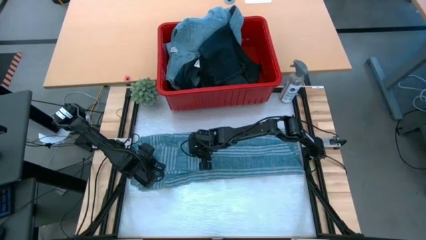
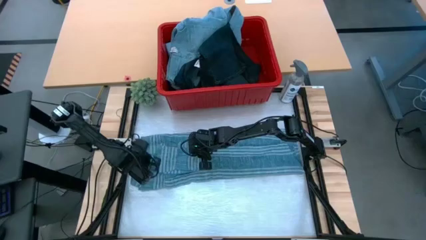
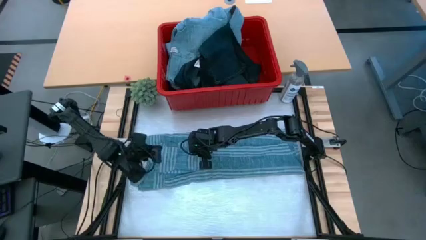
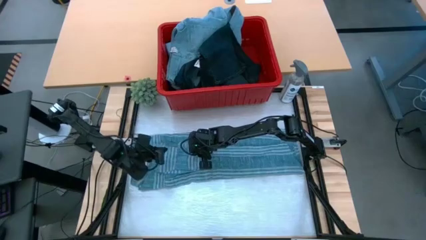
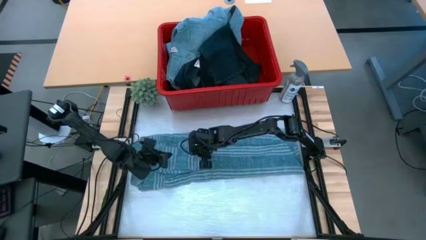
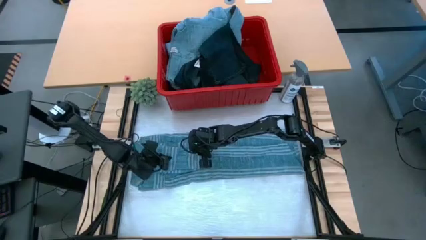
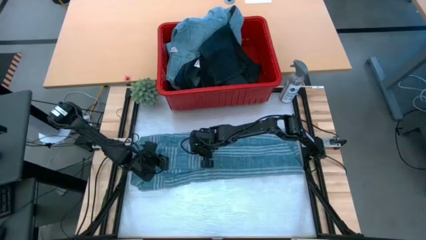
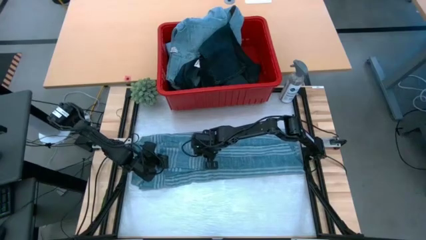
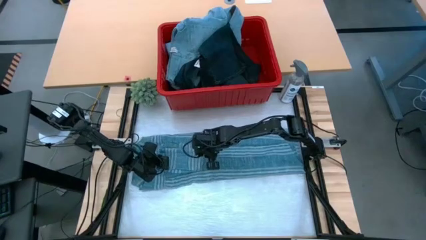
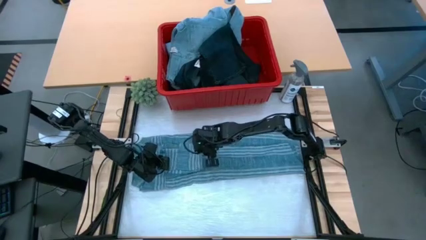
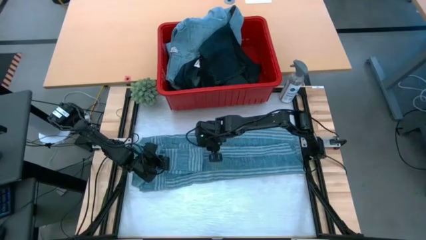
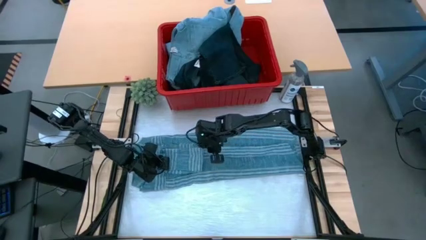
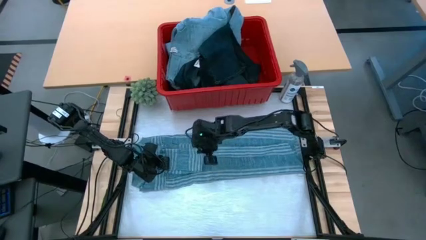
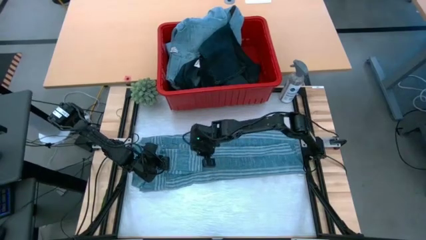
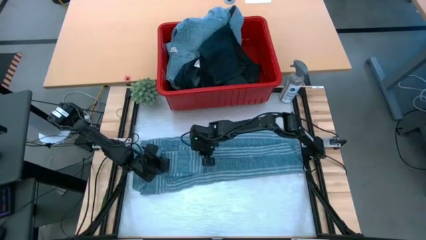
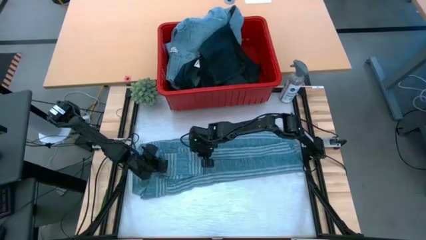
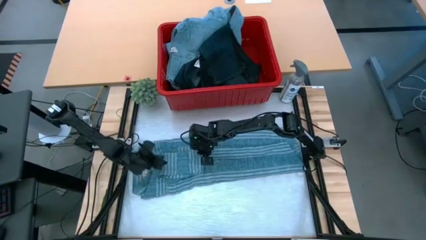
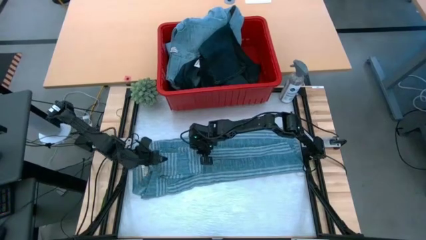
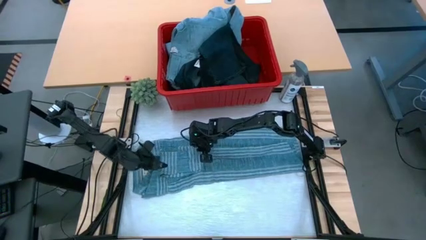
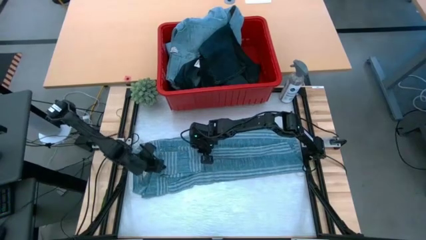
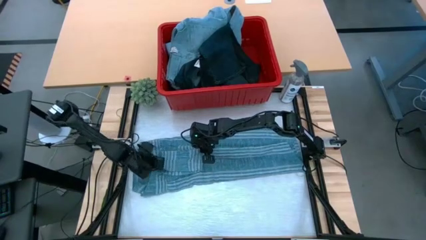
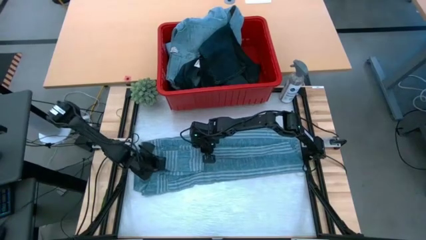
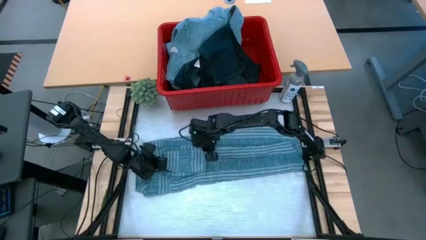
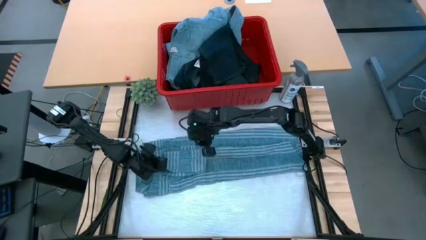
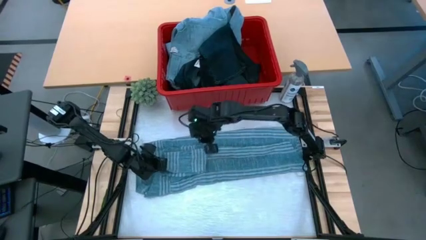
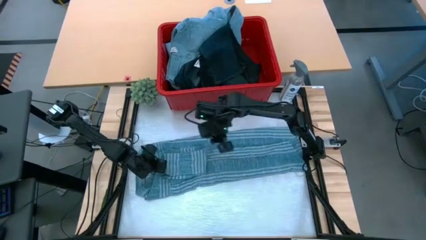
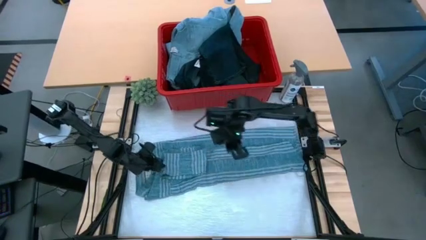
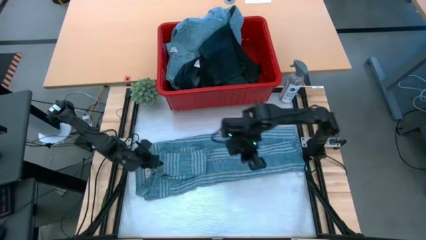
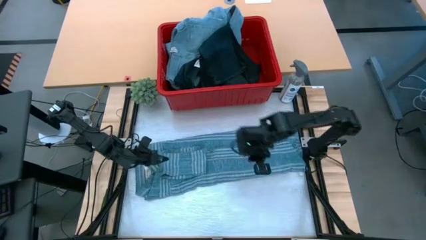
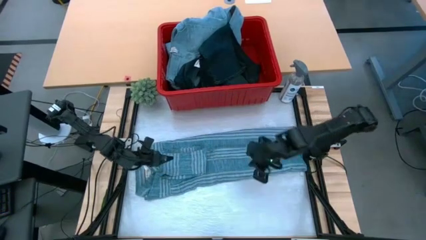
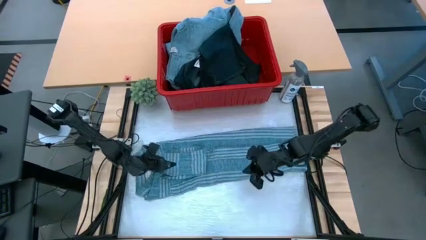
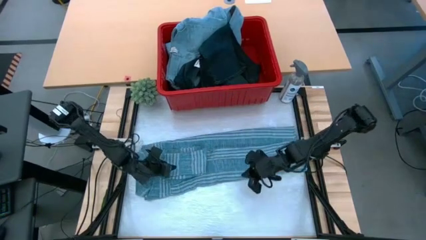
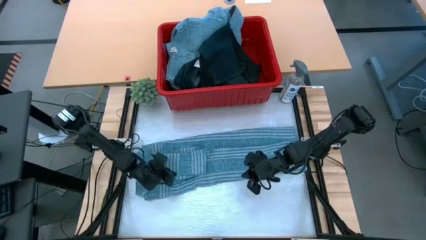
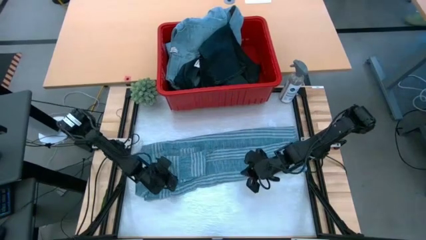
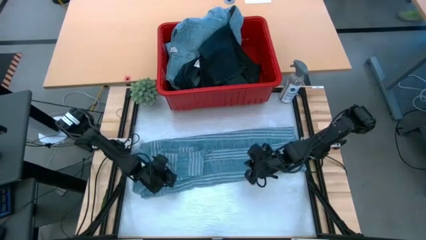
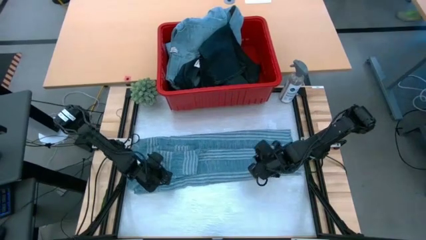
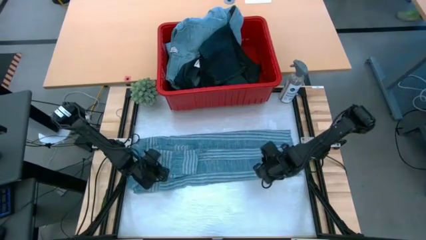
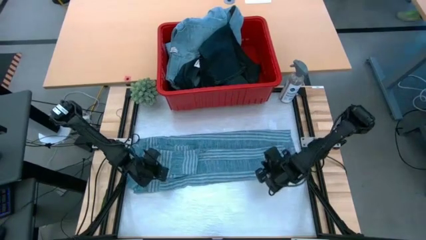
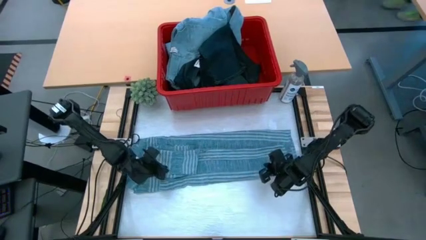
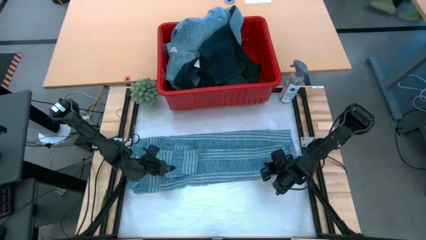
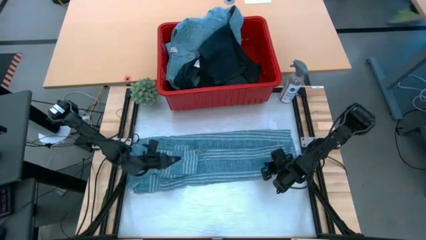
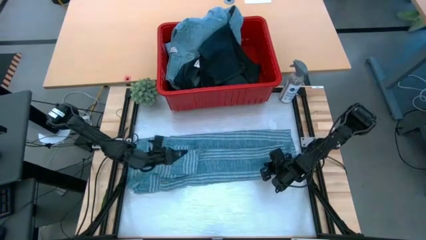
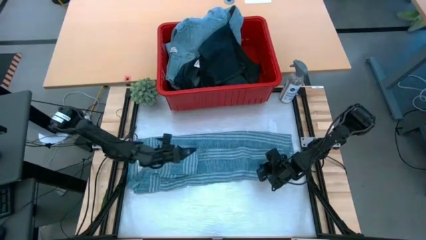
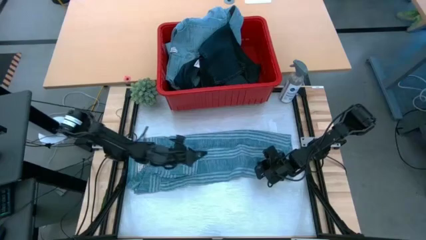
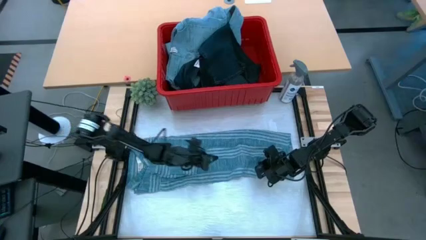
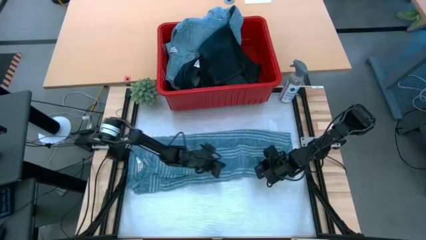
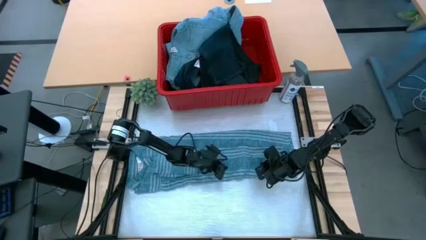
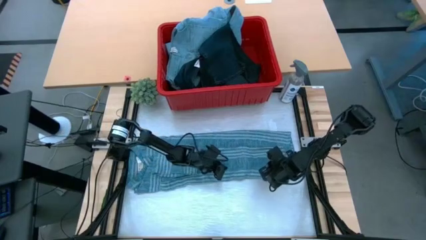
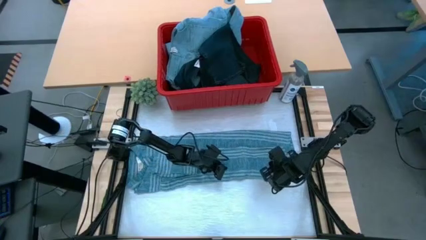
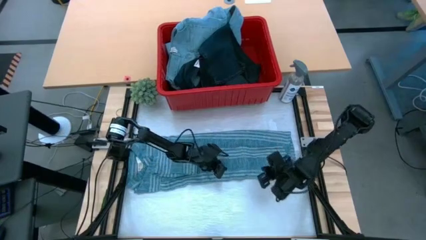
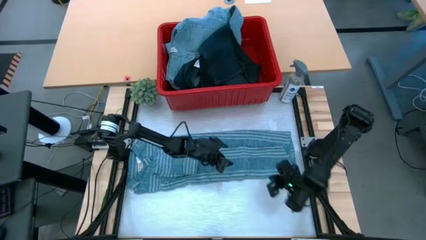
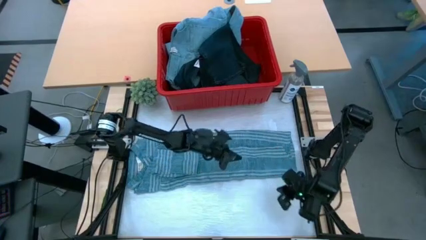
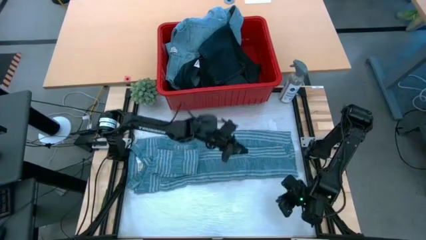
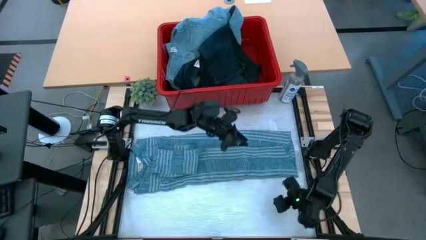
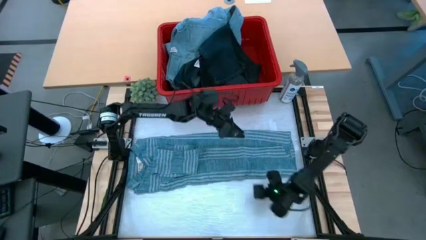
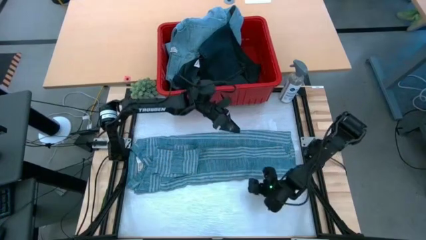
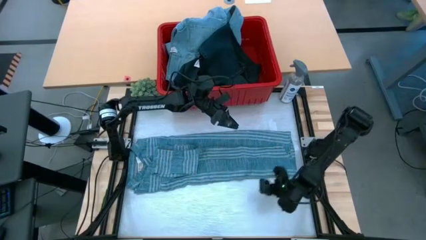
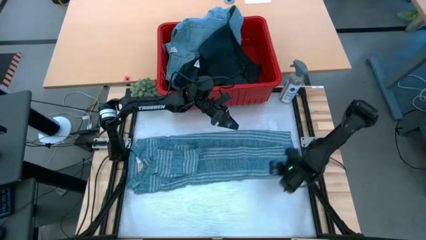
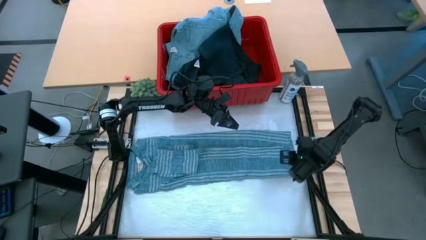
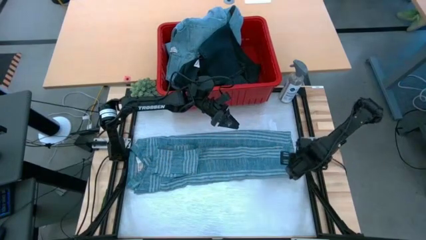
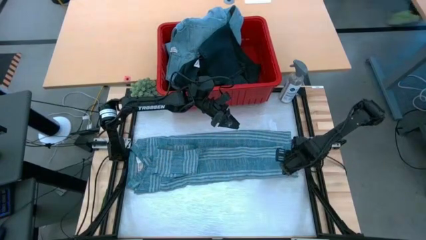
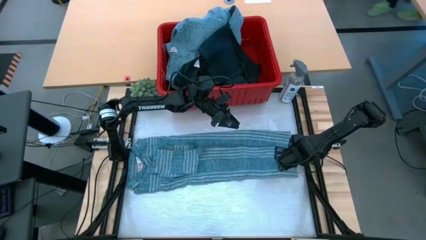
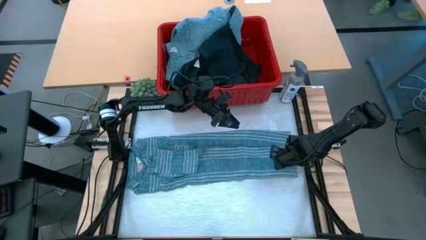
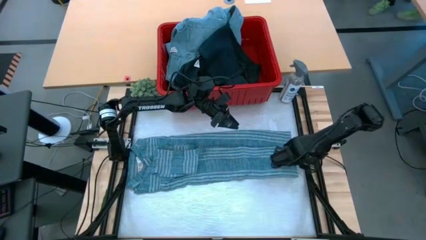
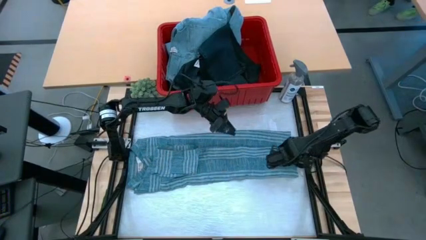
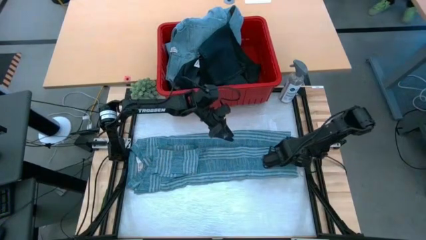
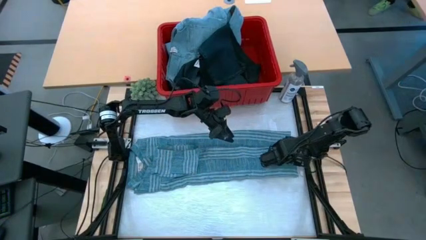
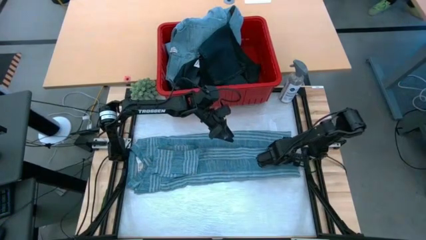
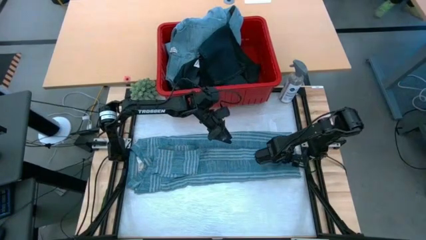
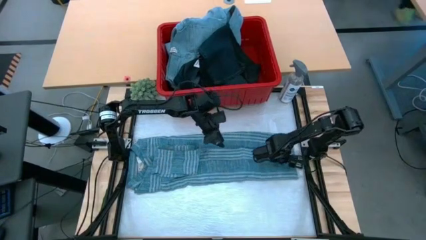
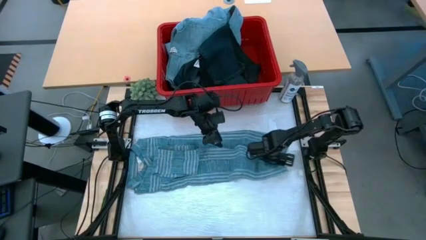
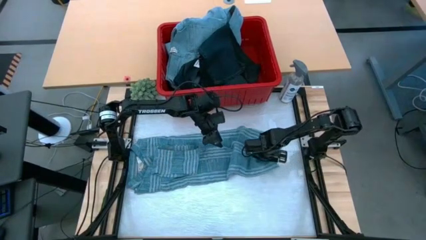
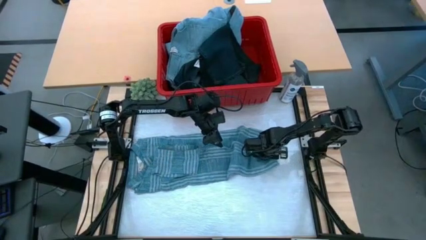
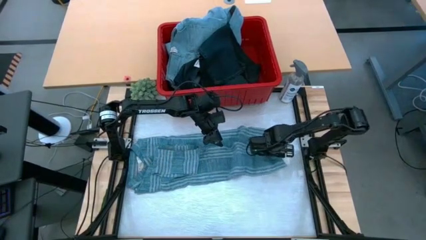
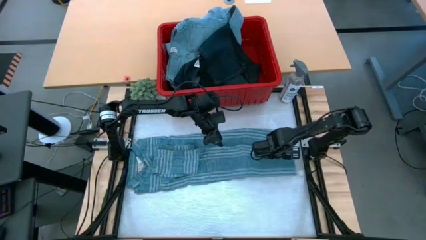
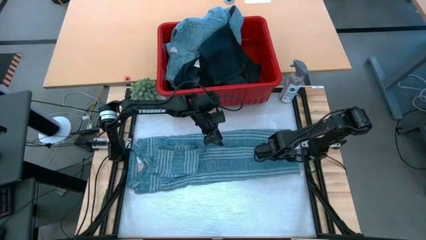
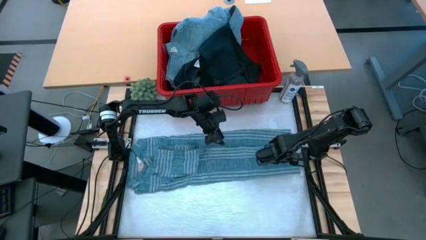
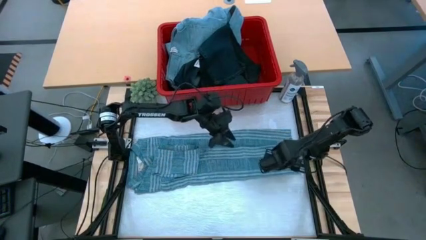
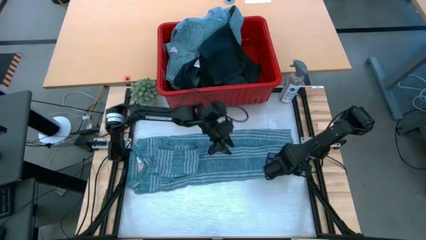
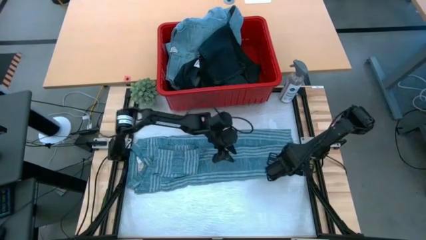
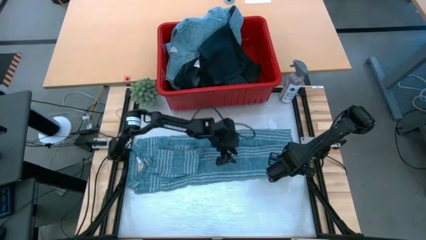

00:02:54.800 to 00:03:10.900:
Task: Fold Laundry from Bin
Fold the blue polo shirt
